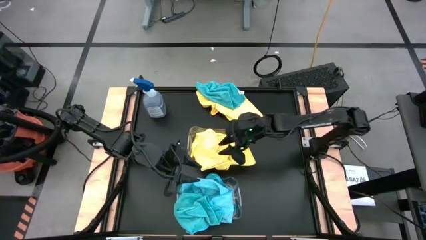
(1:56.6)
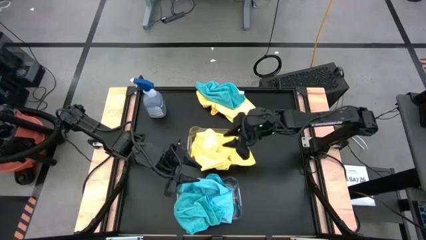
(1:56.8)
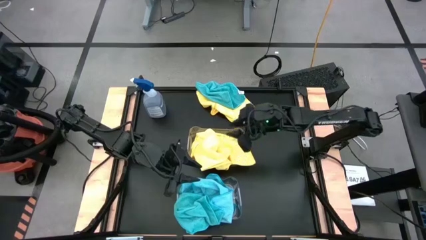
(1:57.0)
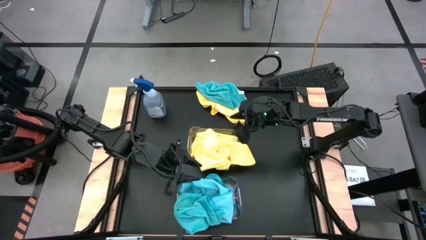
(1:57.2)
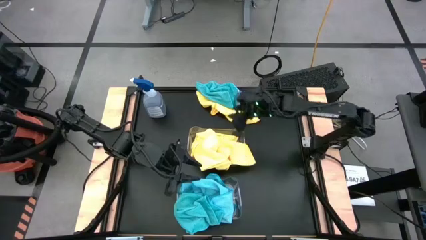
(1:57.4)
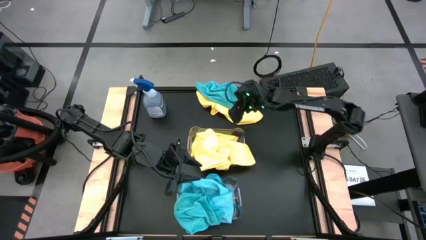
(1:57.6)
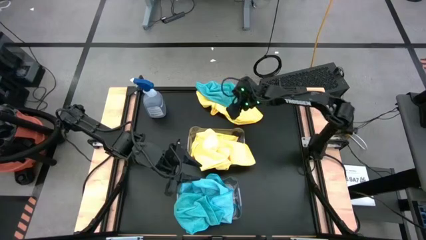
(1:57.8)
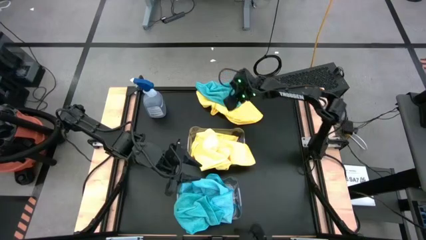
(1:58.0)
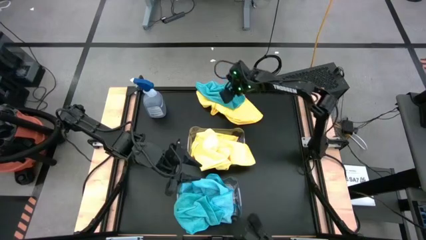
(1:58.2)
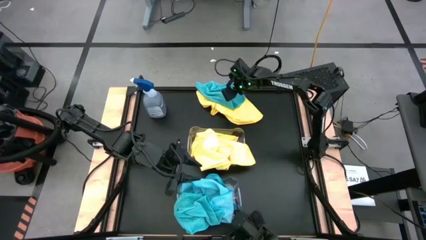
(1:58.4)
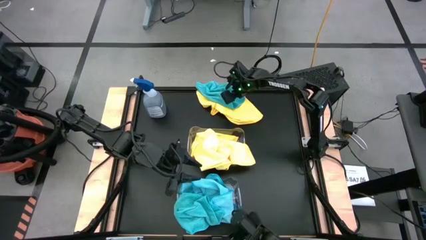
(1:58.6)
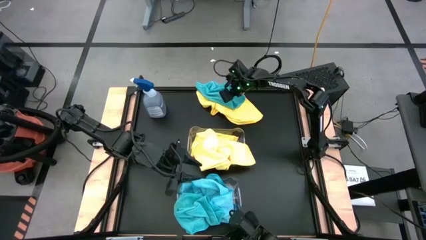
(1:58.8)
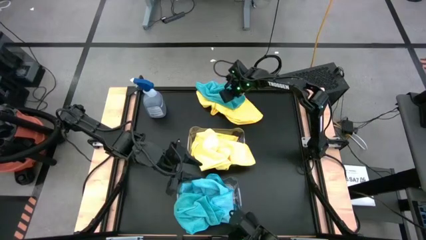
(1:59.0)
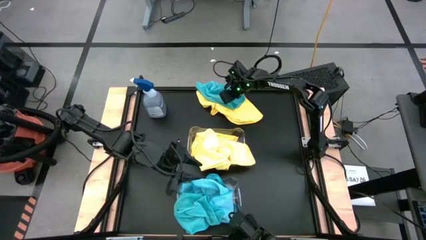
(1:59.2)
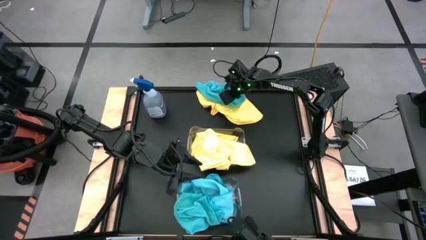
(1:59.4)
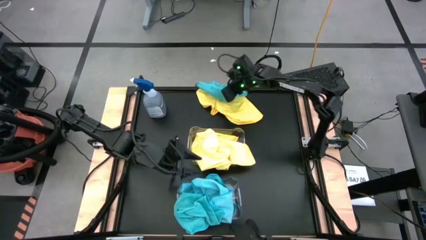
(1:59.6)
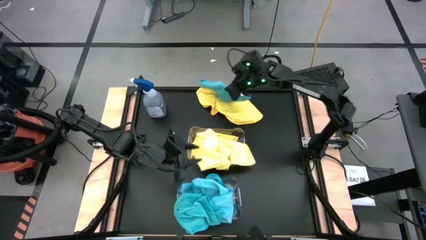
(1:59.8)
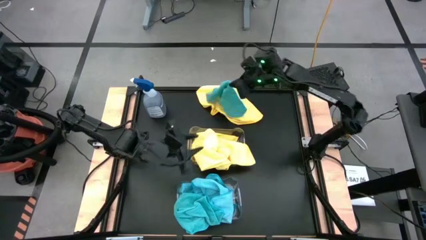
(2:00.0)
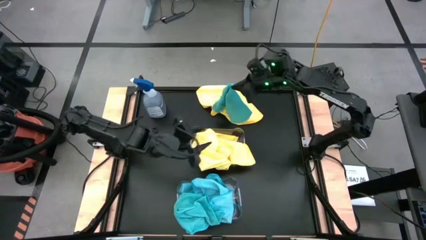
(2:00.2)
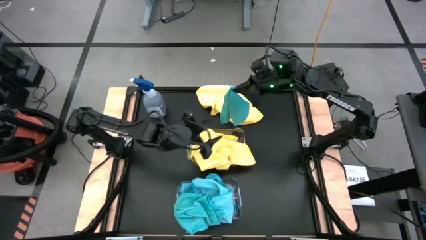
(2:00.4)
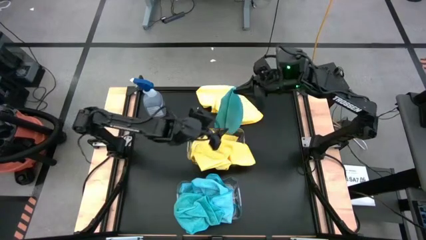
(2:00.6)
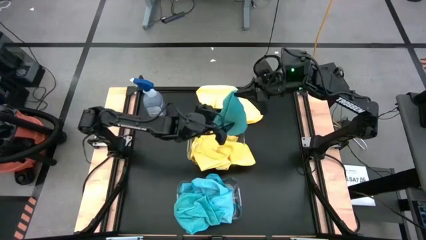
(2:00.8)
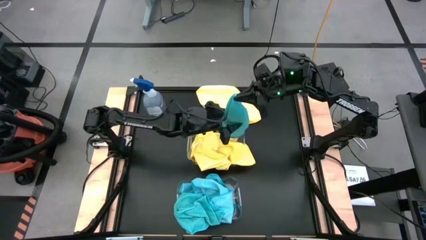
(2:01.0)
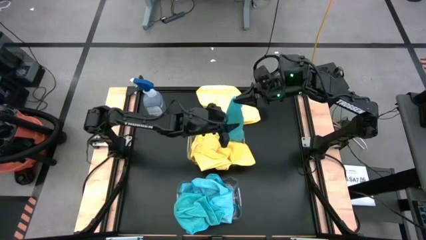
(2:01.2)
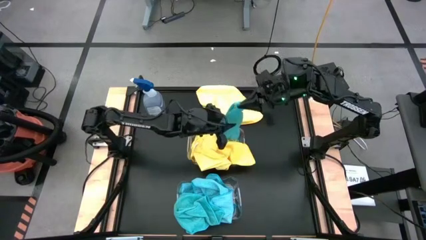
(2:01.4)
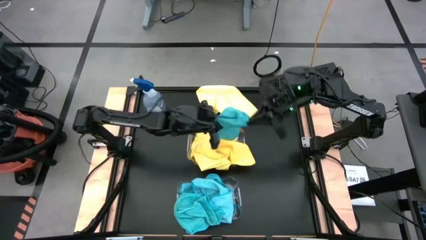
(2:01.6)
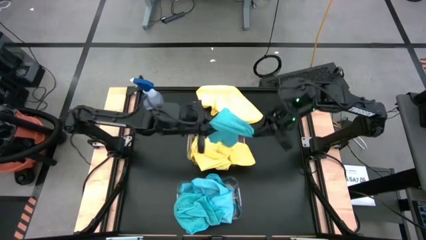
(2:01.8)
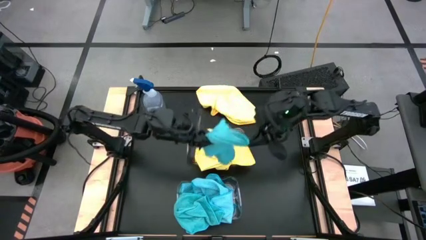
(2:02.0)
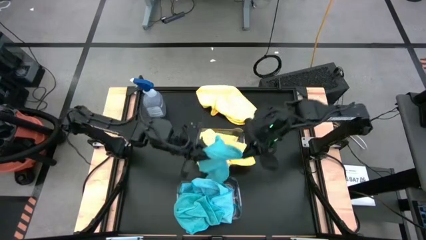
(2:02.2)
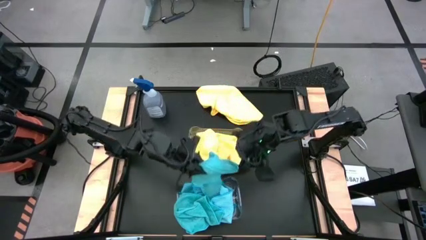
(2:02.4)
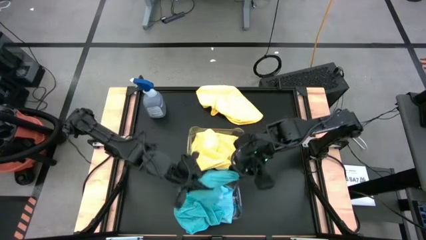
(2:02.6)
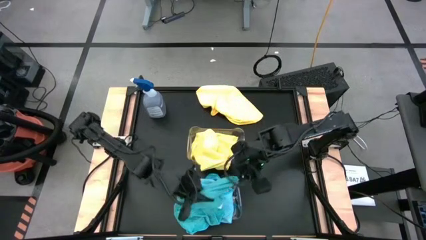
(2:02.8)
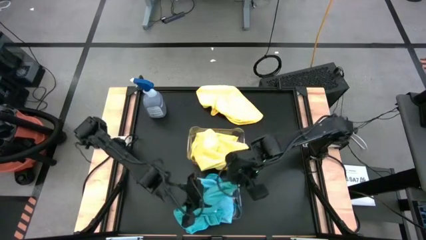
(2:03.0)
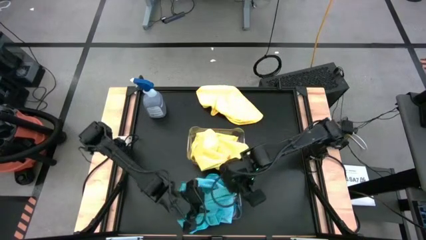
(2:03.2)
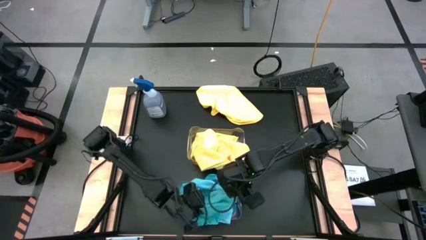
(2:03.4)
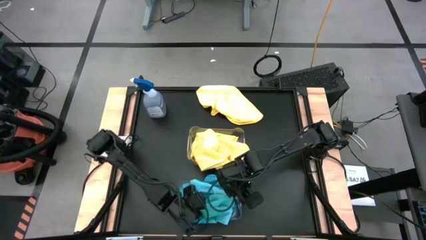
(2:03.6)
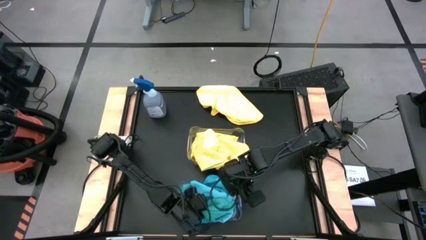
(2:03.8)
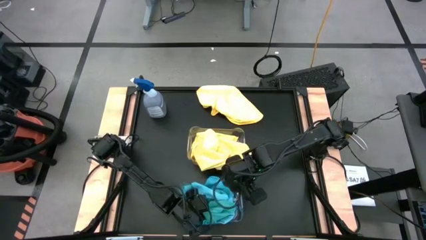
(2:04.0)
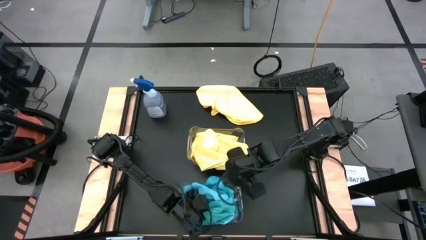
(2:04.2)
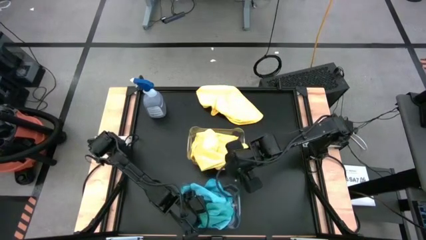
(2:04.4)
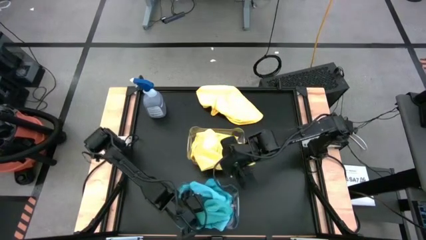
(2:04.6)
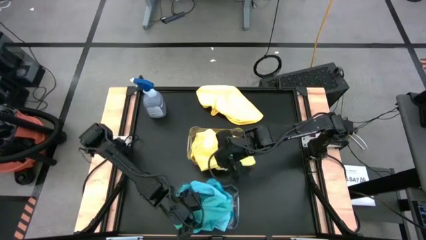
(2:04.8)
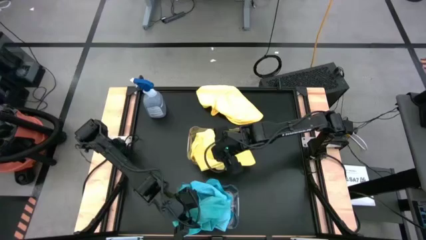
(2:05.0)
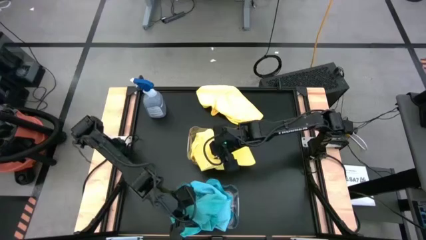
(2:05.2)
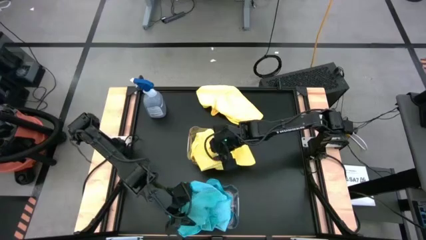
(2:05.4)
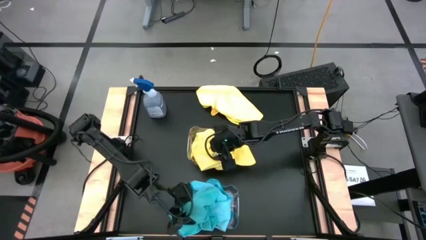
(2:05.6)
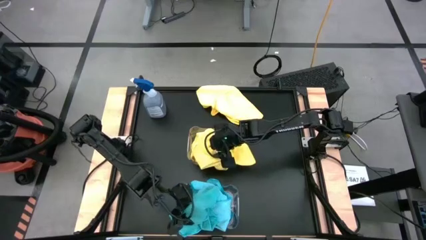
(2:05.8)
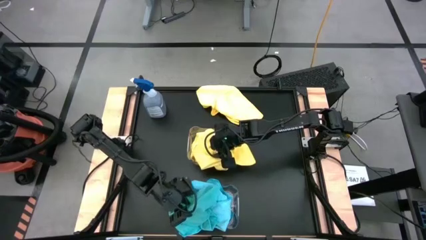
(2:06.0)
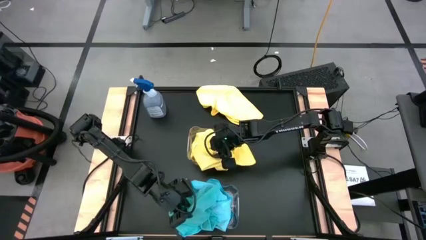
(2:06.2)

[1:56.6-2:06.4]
Task: Sort microfiber towel by color & place in baskets
Put the blue microfiber cloth into the bottom transparent bin

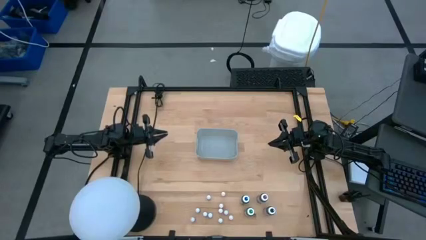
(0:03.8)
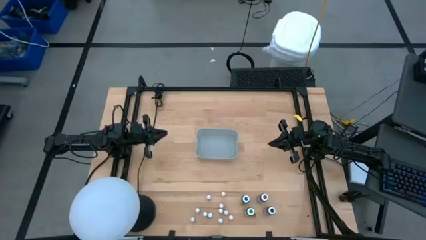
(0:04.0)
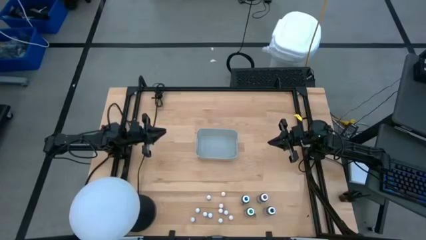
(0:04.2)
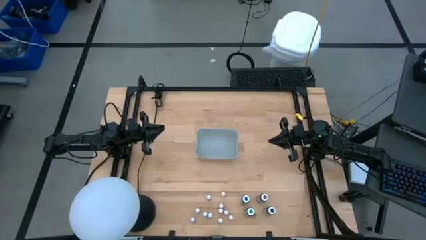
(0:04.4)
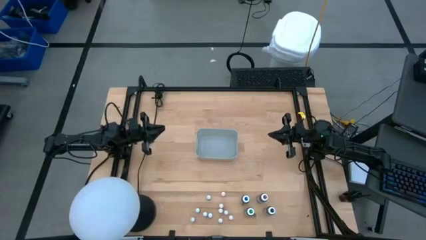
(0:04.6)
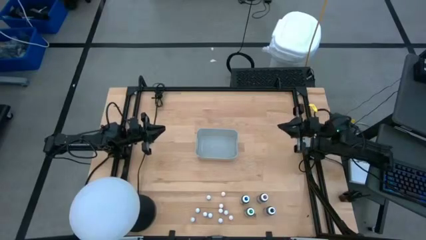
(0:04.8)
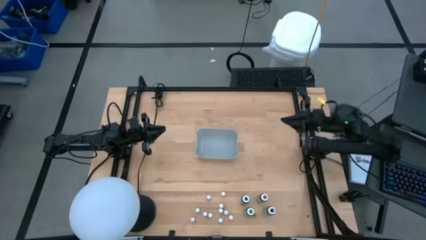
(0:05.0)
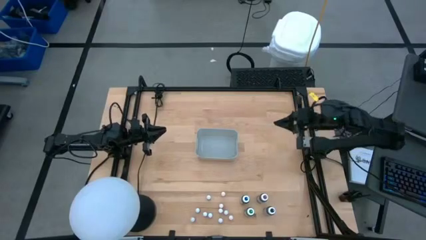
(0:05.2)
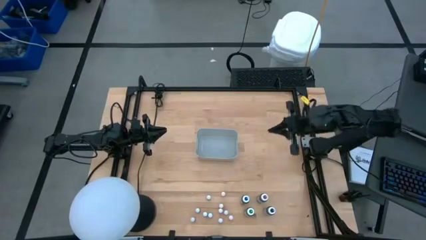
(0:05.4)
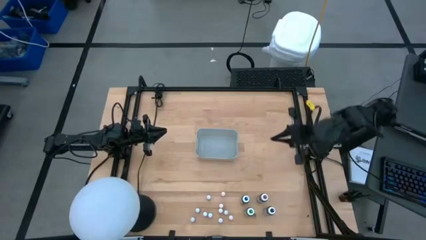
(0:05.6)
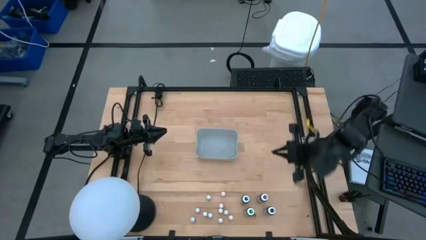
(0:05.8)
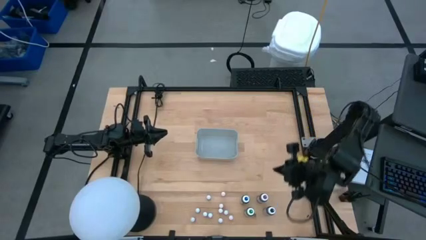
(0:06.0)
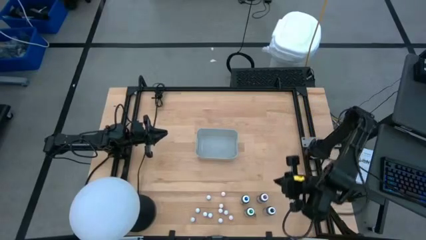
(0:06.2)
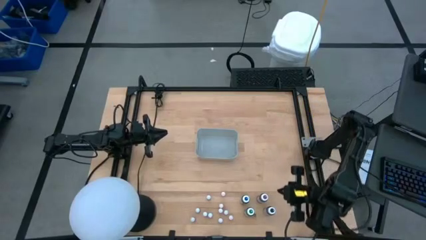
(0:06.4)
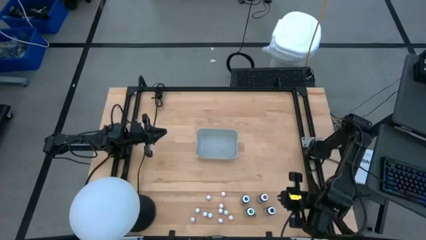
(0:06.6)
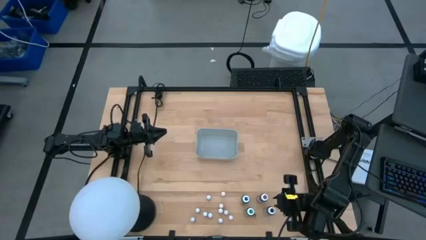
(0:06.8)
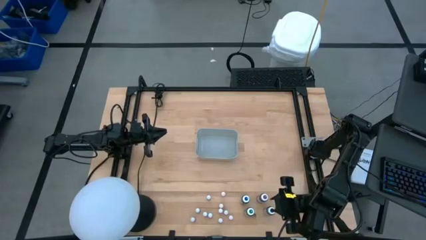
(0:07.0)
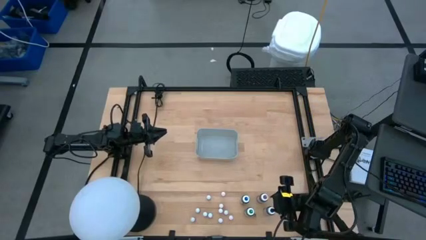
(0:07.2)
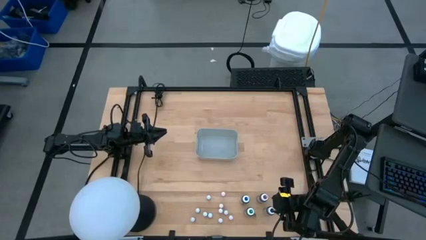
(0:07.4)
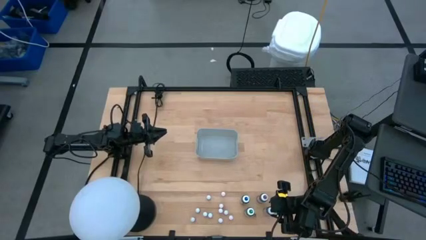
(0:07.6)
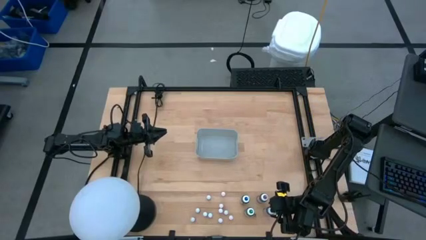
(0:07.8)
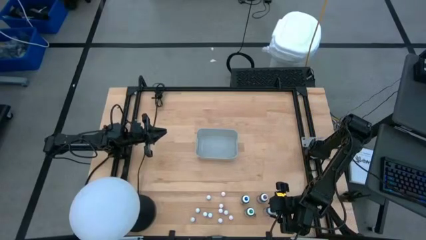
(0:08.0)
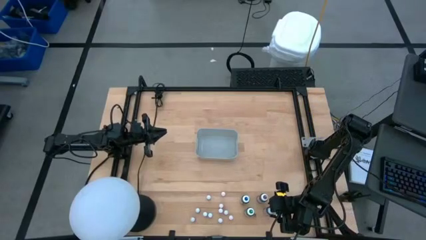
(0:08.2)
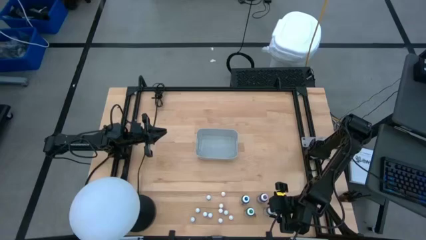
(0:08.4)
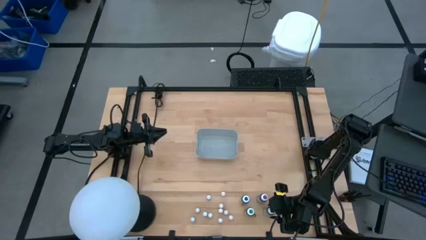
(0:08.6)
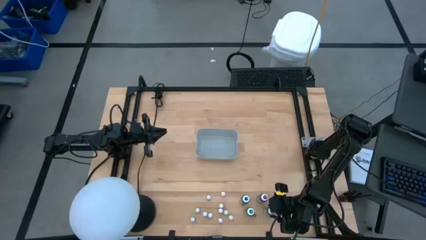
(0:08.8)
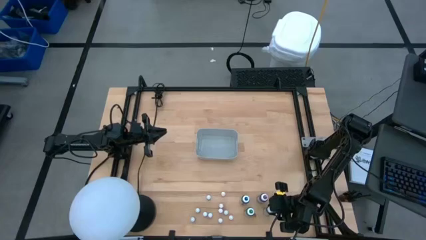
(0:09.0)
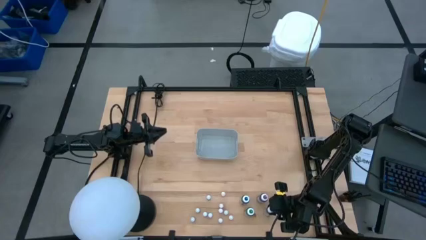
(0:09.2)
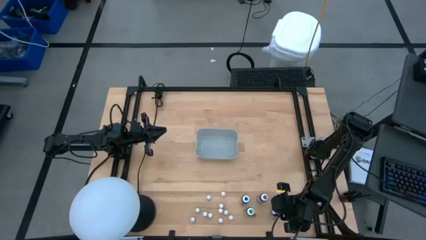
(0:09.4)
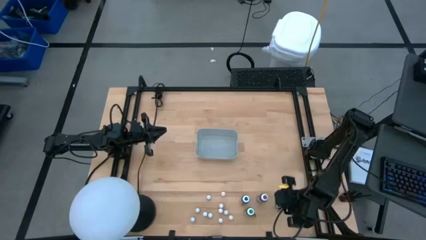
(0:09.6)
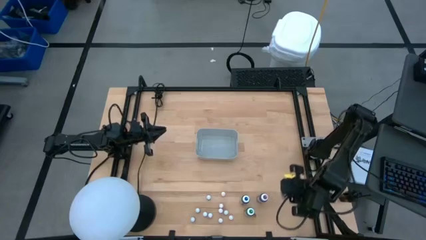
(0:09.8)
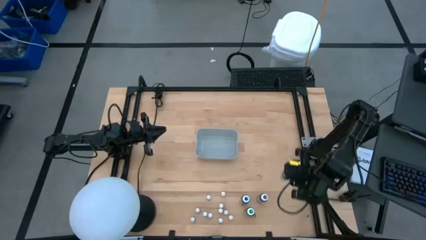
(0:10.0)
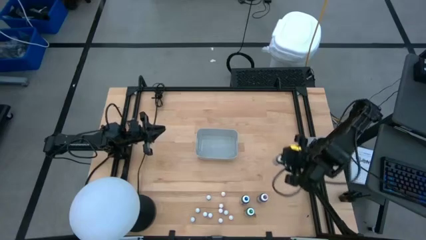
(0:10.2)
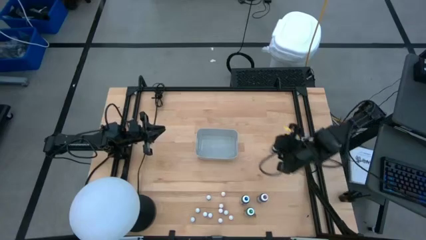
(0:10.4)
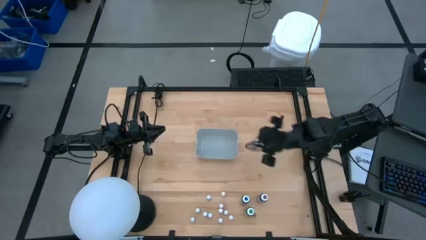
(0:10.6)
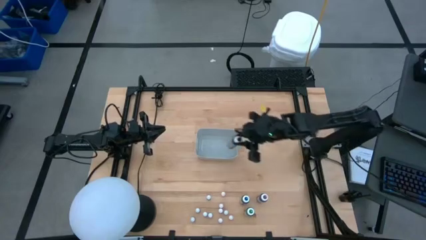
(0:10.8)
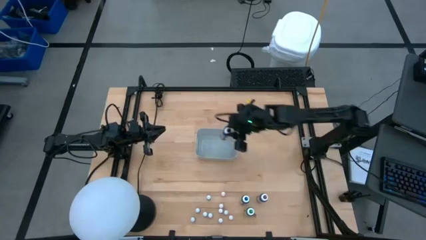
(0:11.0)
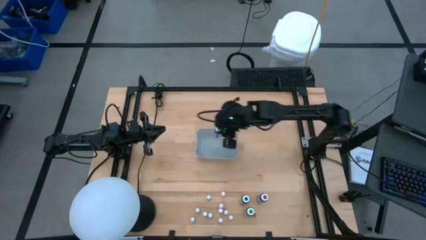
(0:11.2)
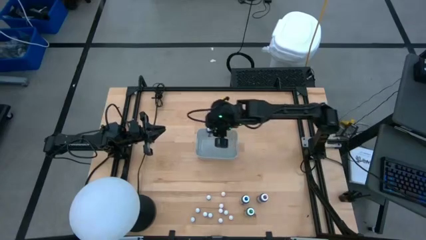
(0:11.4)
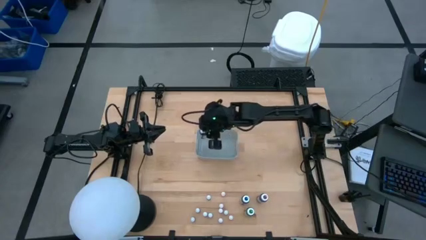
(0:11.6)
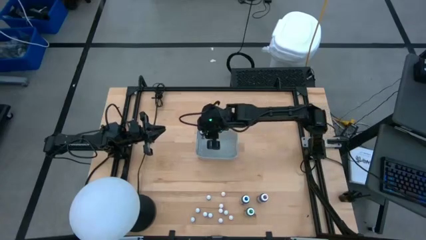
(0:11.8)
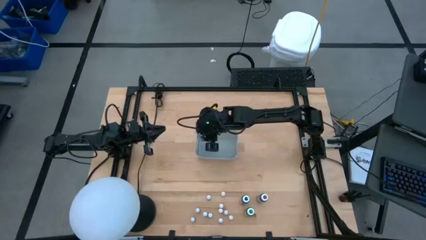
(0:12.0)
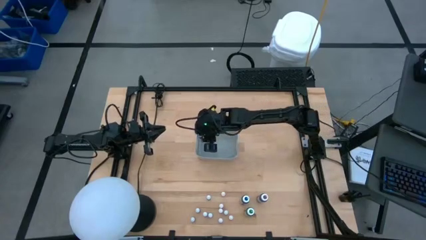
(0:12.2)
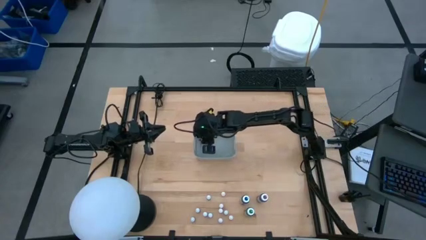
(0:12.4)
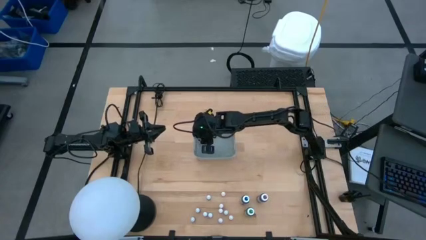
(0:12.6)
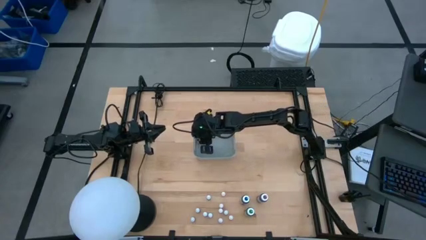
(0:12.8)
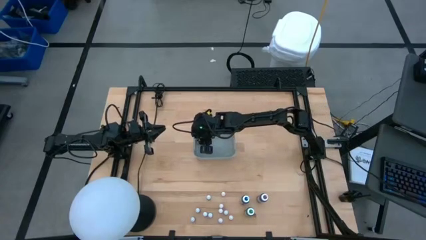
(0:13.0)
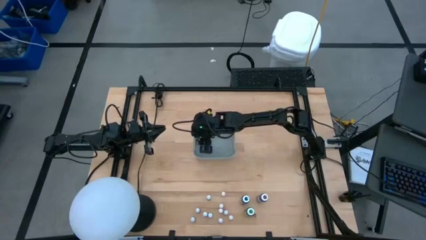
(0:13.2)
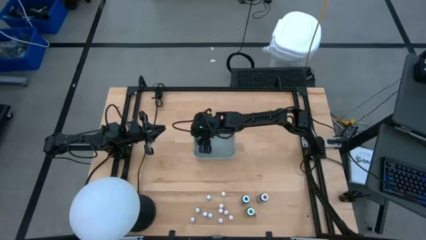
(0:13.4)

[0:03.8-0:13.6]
Task: Pick & Place food coloring
Put the large black food coloring bottle into the gray bin
